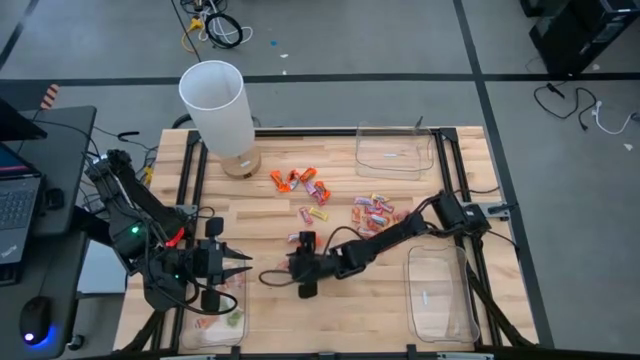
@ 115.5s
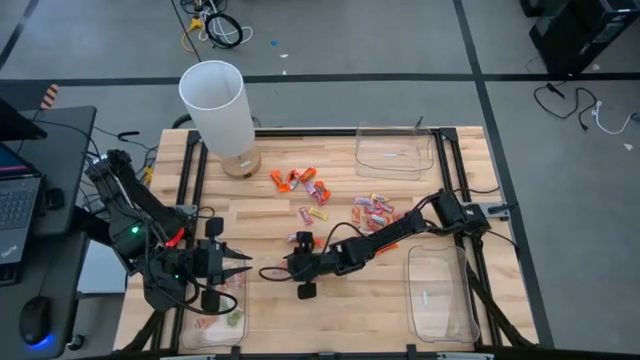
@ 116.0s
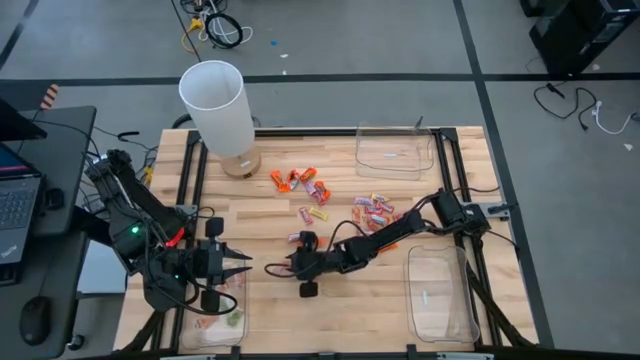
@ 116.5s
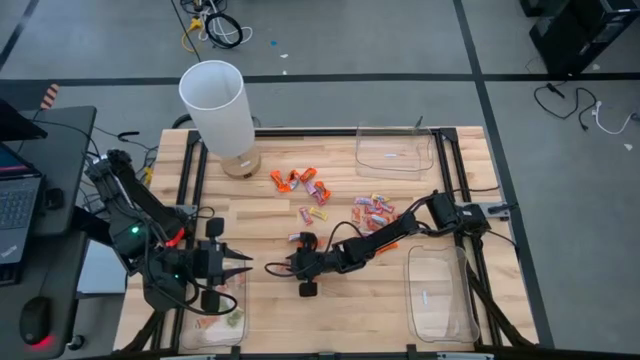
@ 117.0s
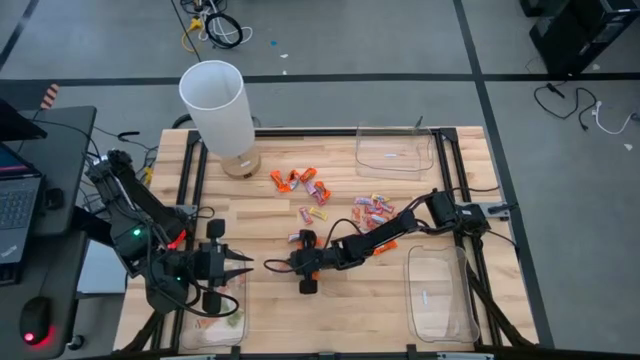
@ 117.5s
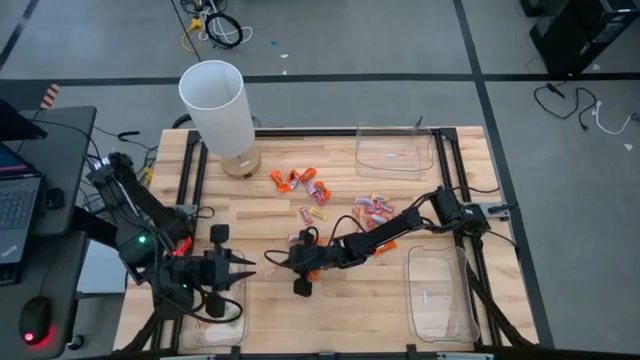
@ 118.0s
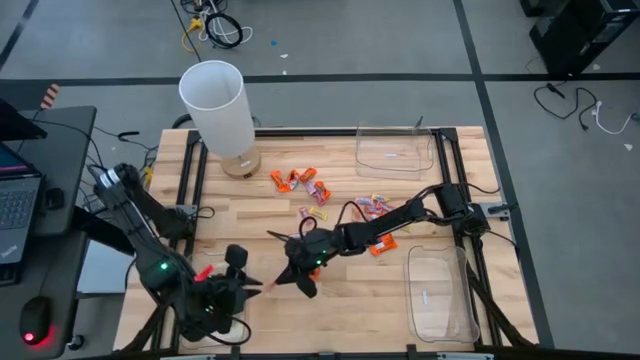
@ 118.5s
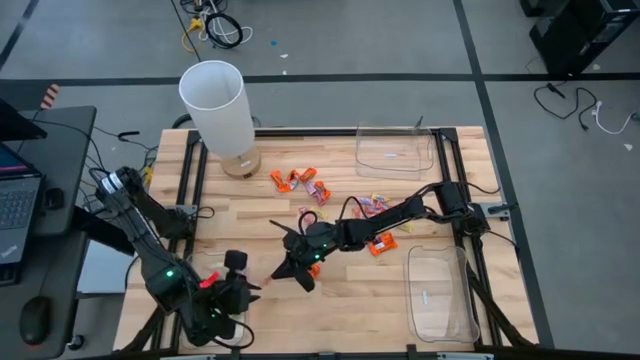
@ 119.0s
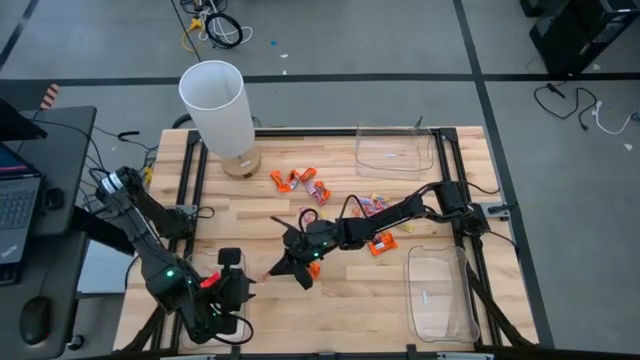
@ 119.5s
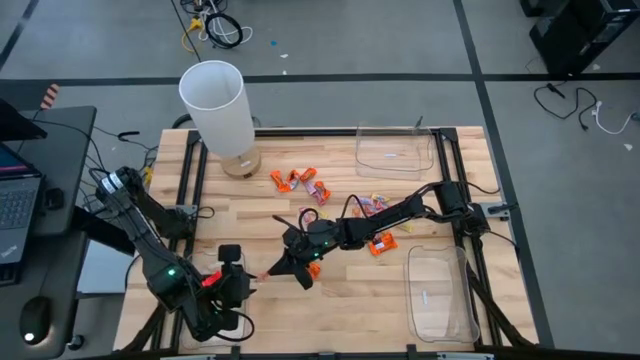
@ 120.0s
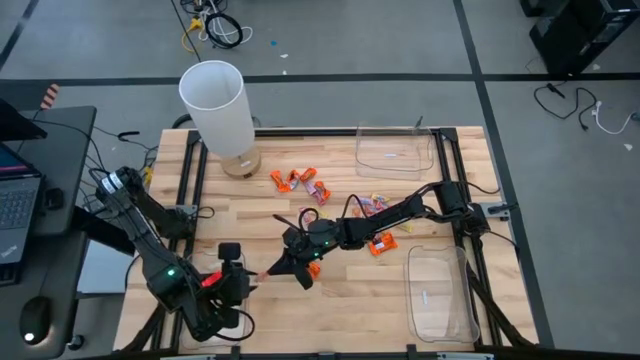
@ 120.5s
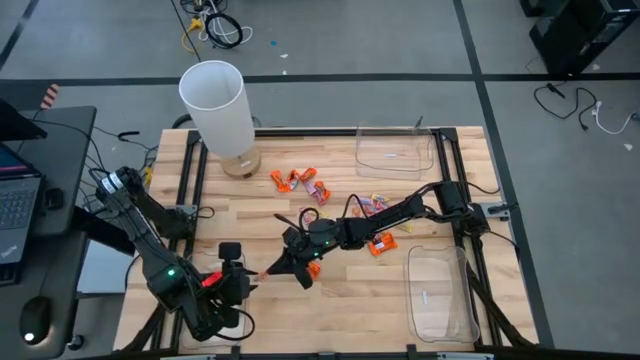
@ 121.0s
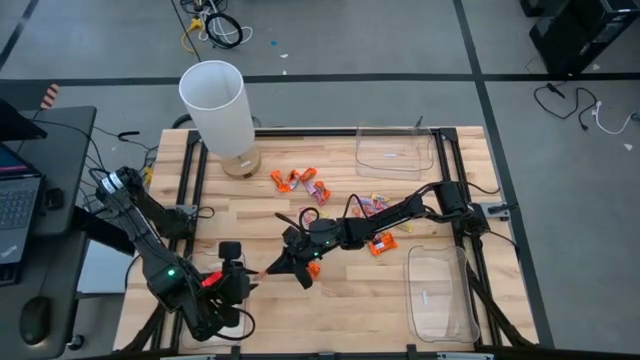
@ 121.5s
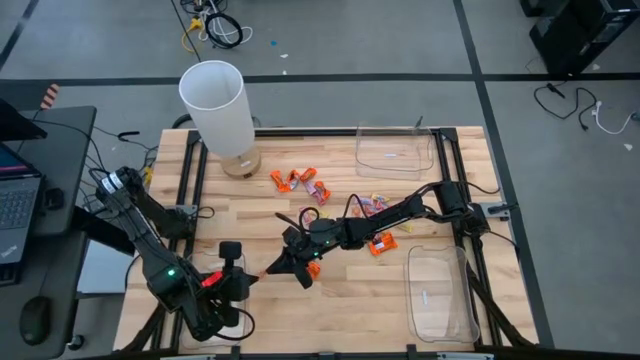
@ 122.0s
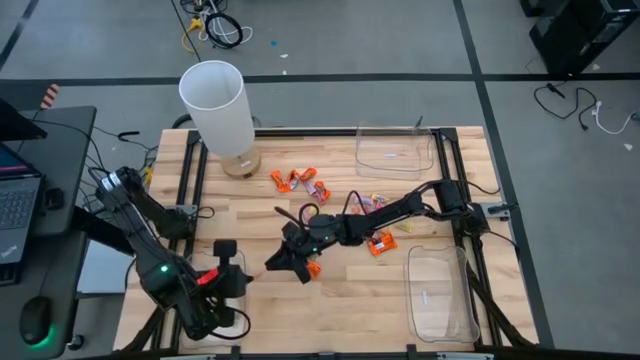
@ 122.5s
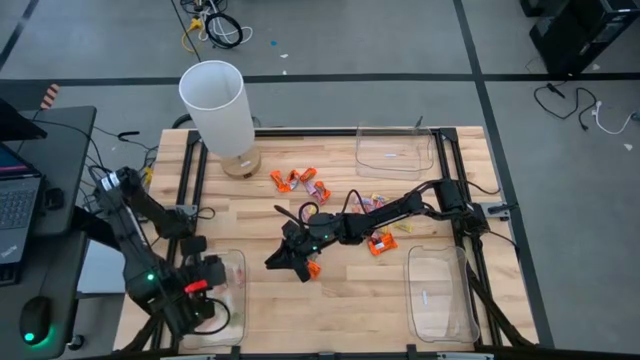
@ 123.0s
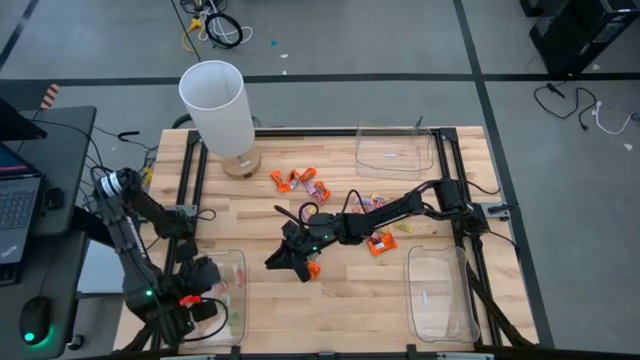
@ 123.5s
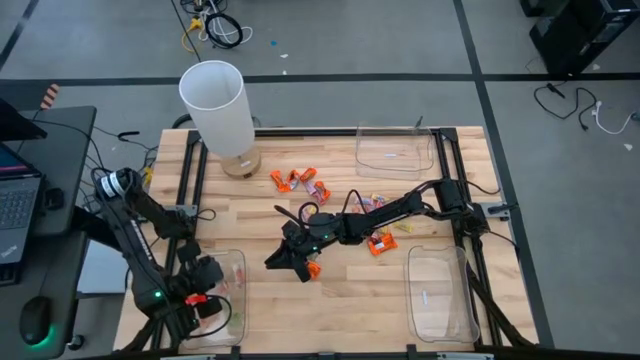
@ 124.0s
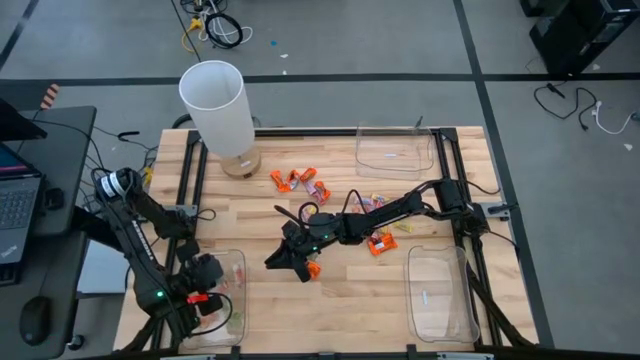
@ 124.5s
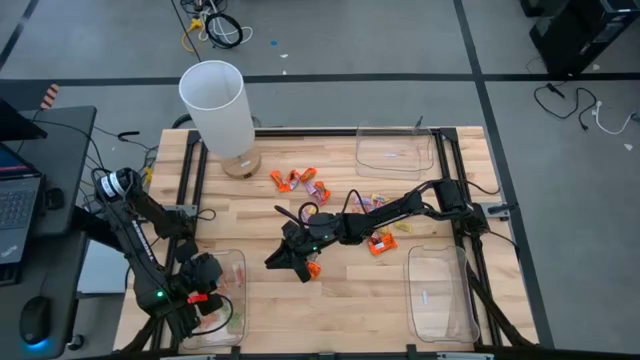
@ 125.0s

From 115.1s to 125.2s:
Task: Sort candy
Put the orange gummy into the bottom left transparent bin

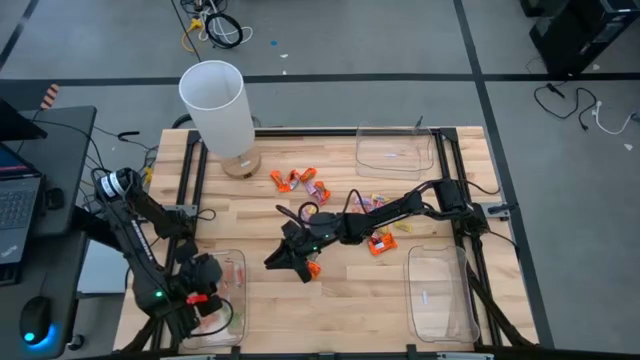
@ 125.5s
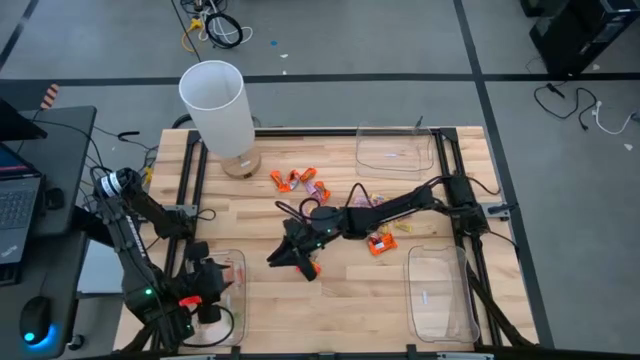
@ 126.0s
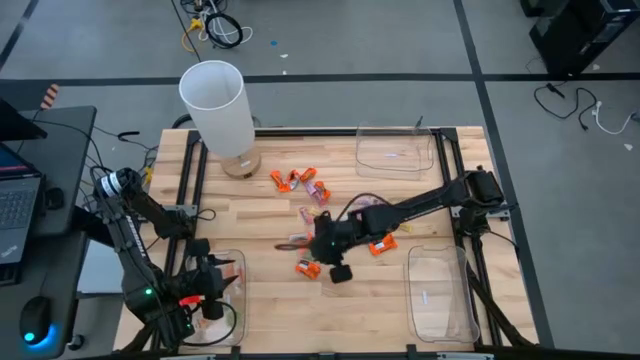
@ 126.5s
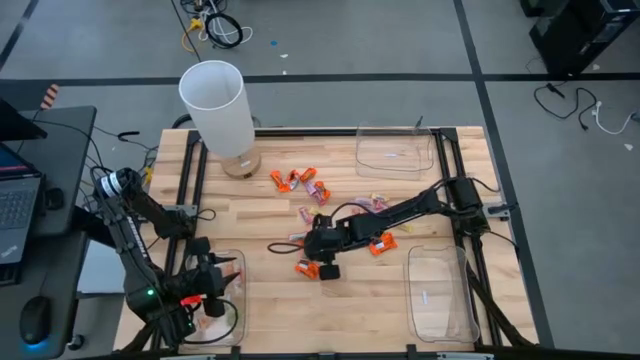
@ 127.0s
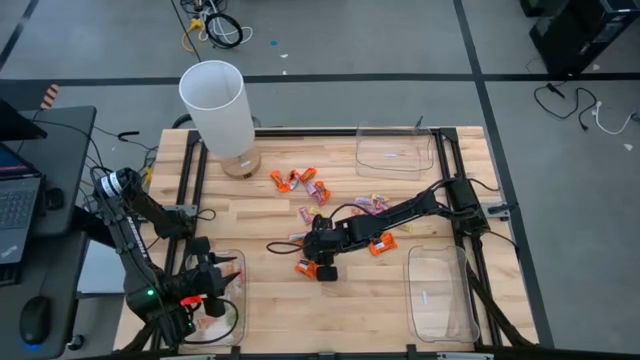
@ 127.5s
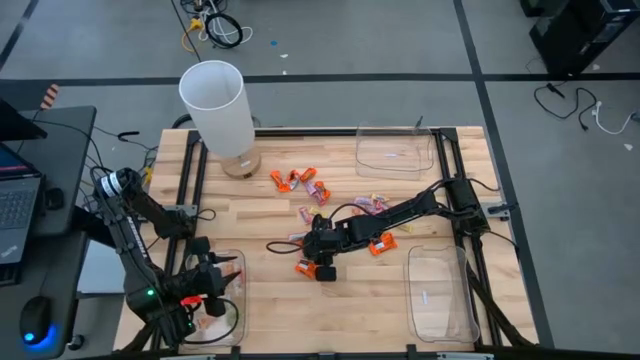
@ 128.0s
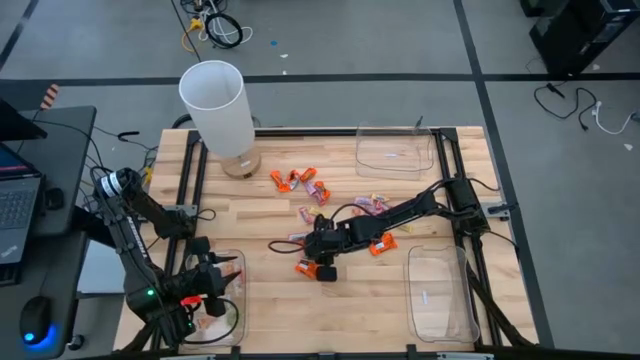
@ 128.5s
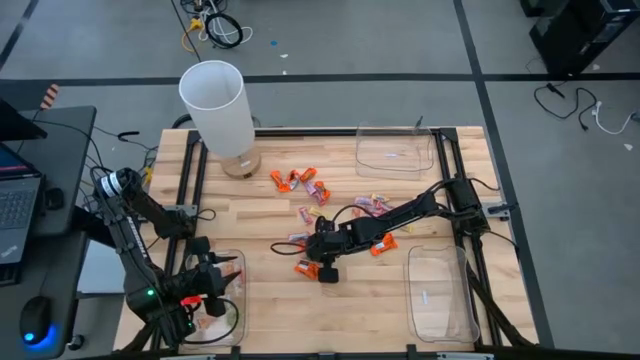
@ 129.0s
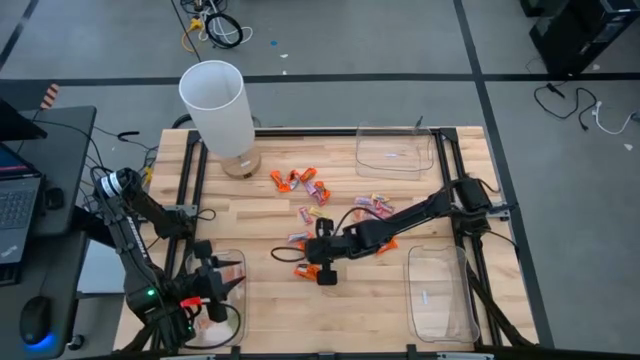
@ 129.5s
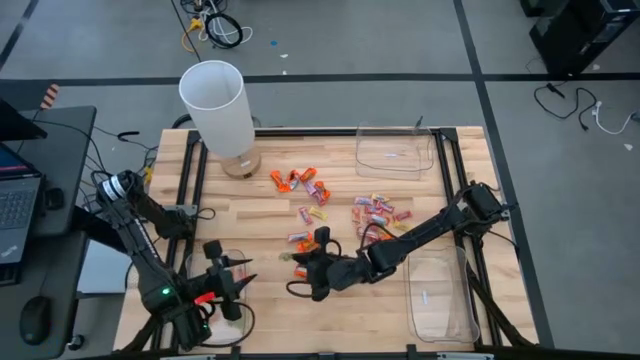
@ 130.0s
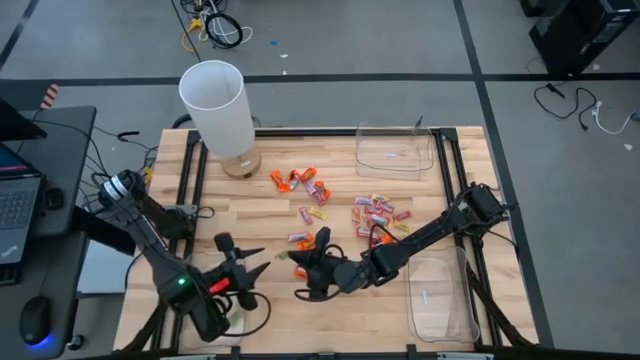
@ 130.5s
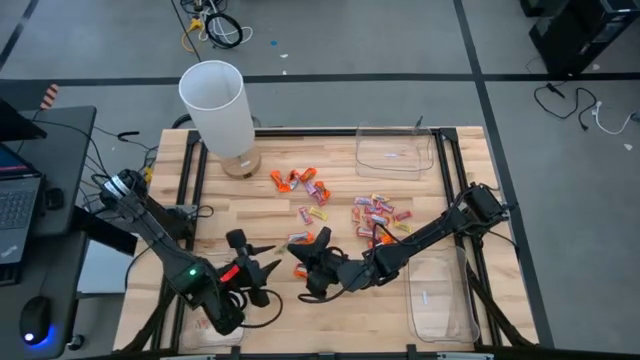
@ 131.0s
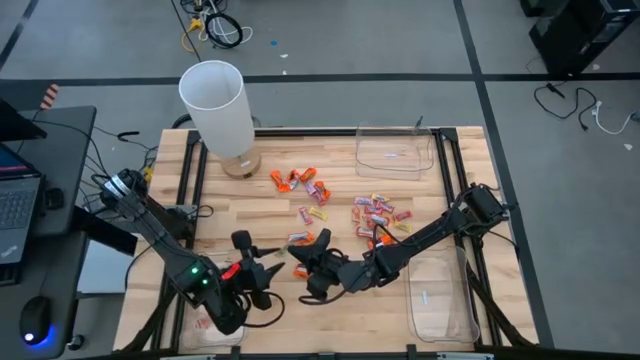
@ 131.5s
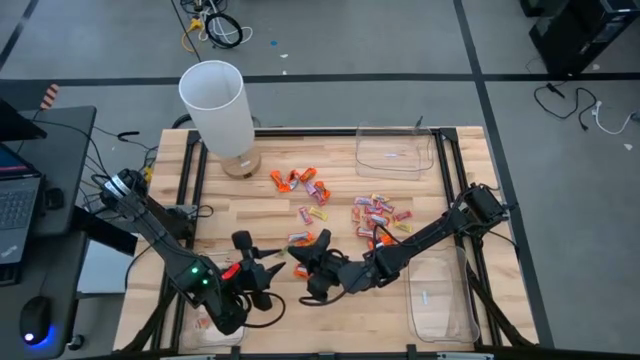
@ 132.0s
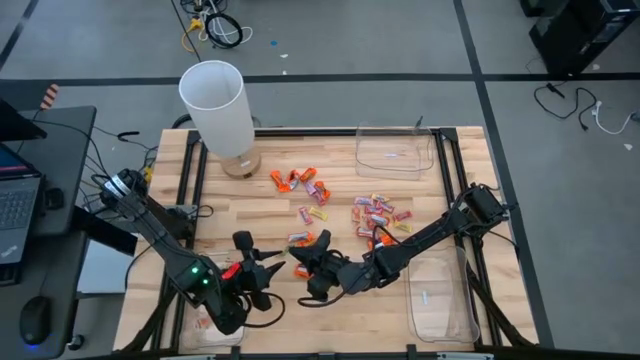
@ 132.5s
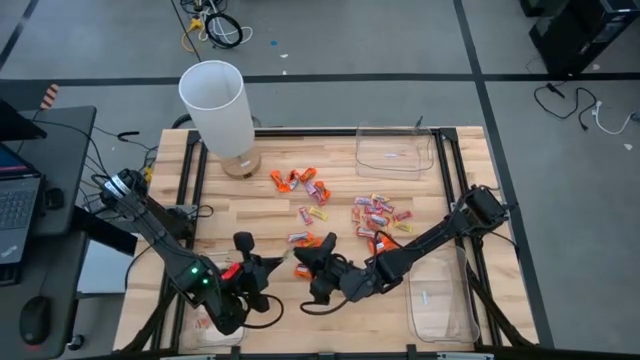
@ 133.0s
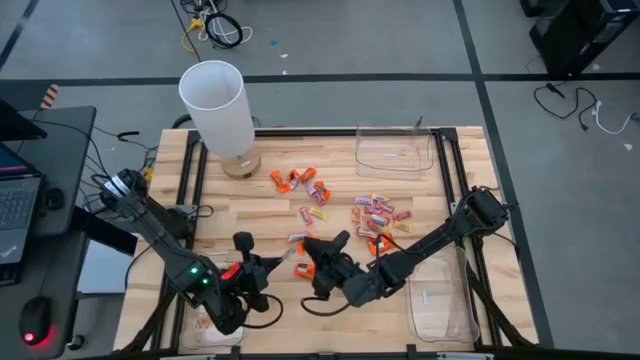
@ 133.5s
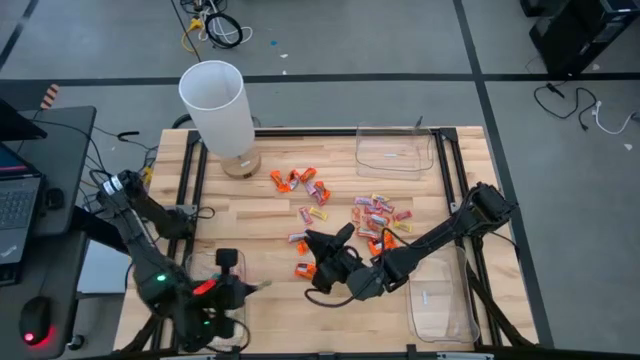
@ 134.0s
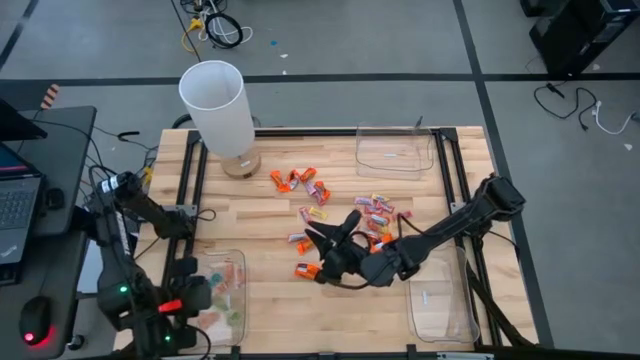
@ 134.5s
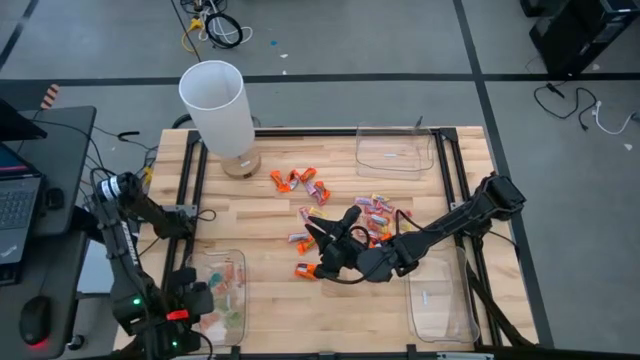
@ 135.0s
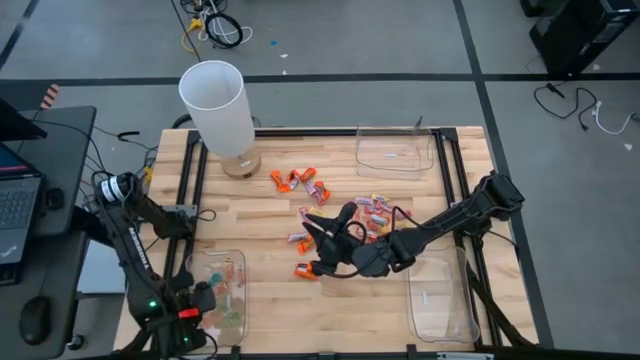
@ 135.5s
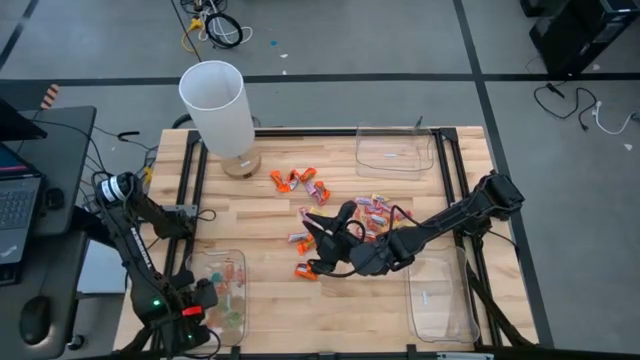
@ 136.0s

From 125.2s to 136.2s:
Put the green gummy into the bottom left transparent bin
